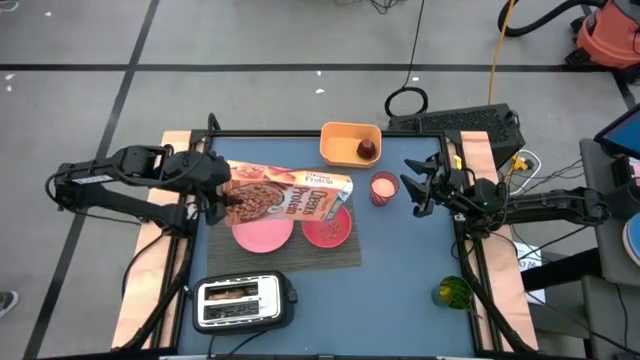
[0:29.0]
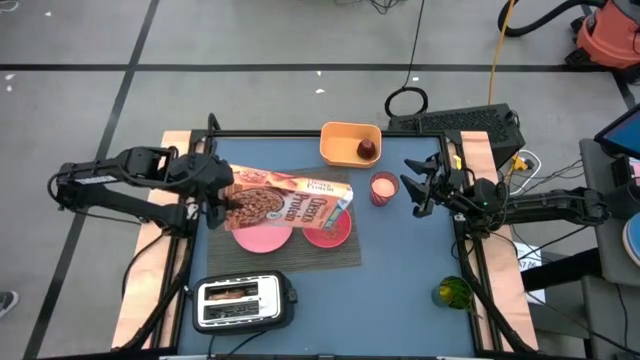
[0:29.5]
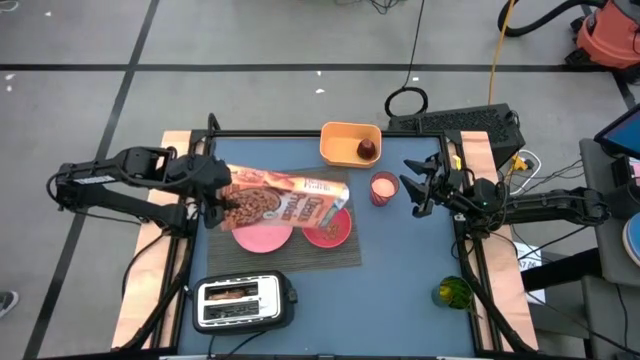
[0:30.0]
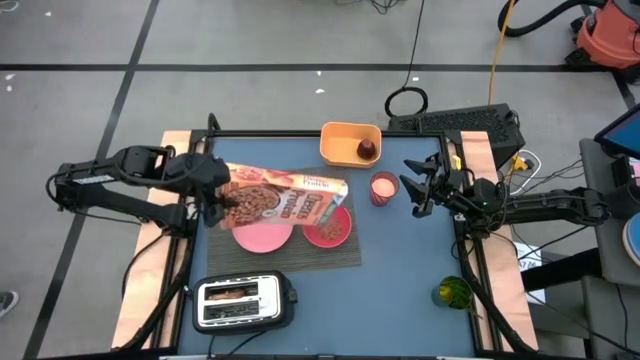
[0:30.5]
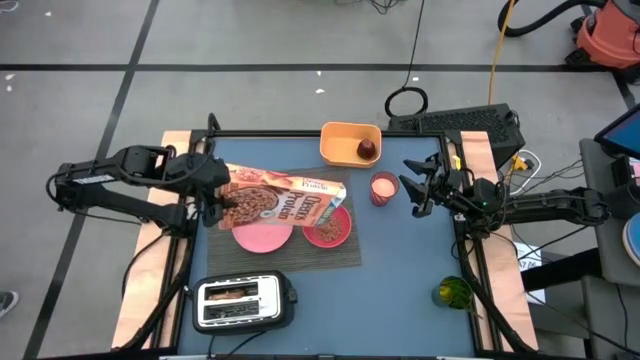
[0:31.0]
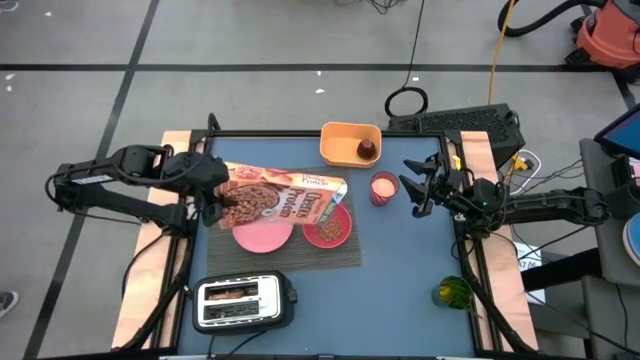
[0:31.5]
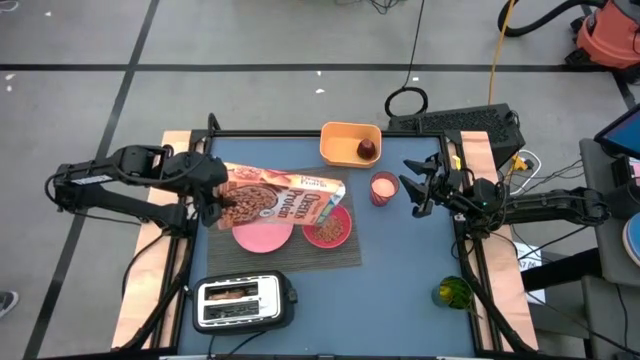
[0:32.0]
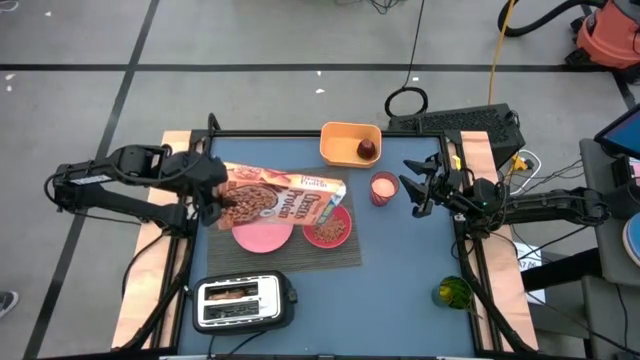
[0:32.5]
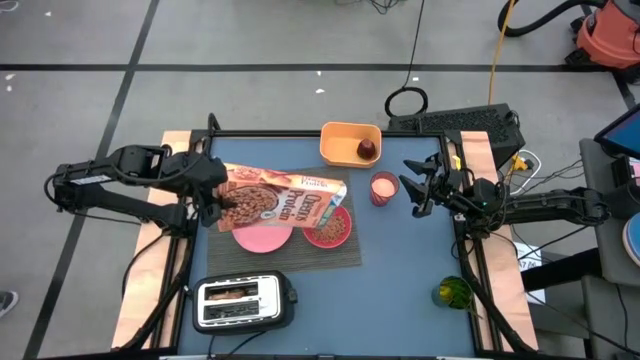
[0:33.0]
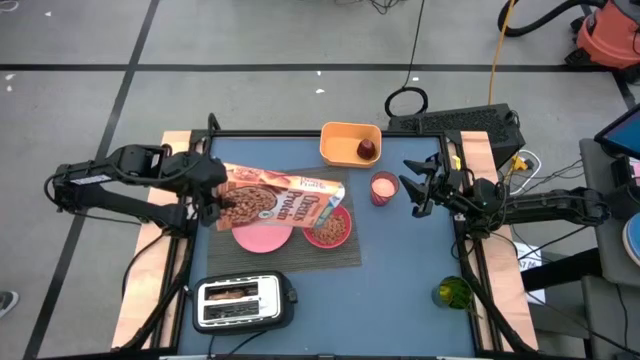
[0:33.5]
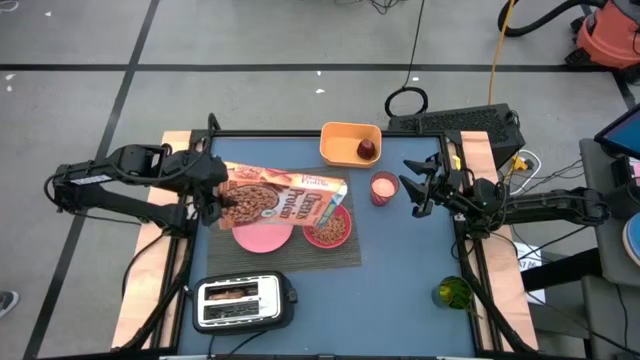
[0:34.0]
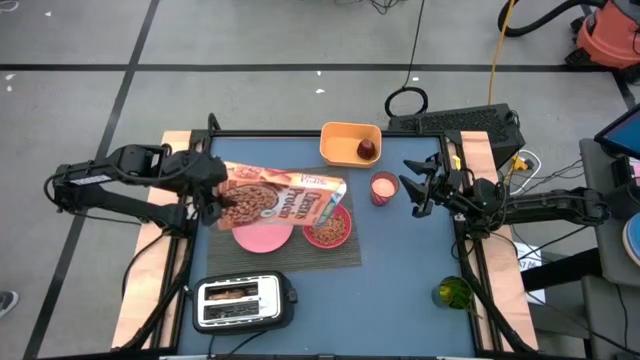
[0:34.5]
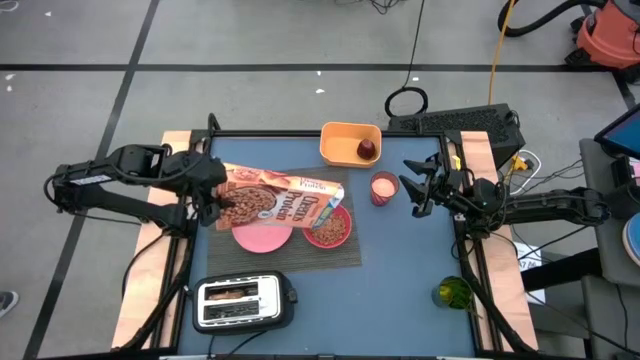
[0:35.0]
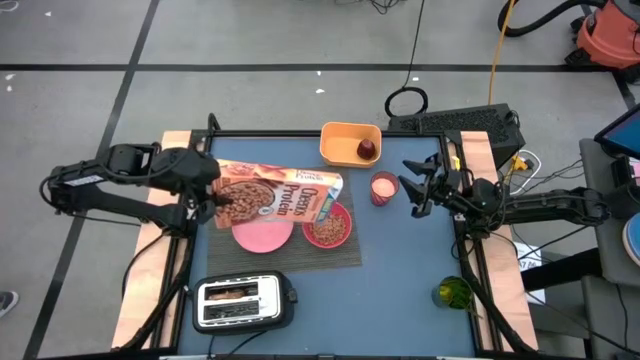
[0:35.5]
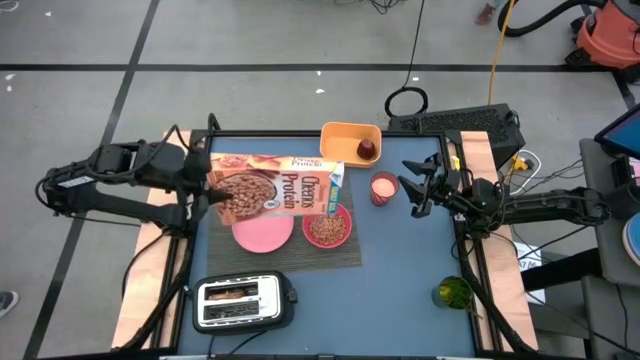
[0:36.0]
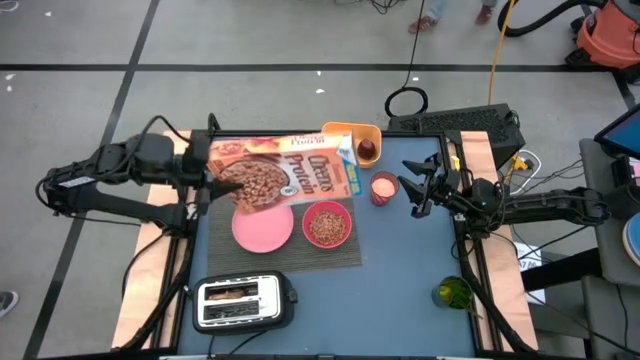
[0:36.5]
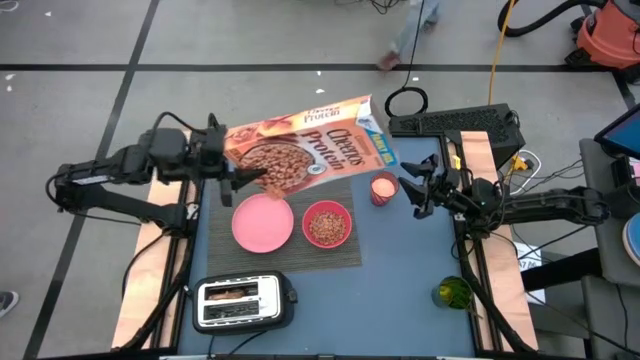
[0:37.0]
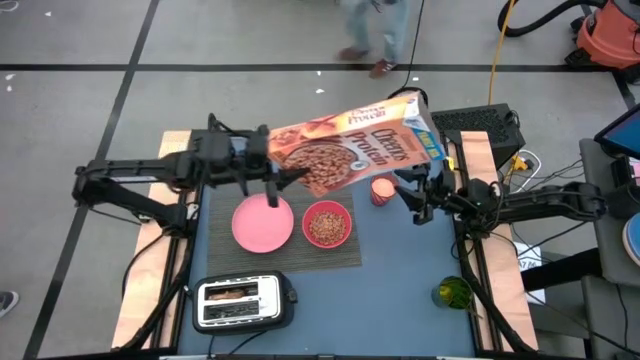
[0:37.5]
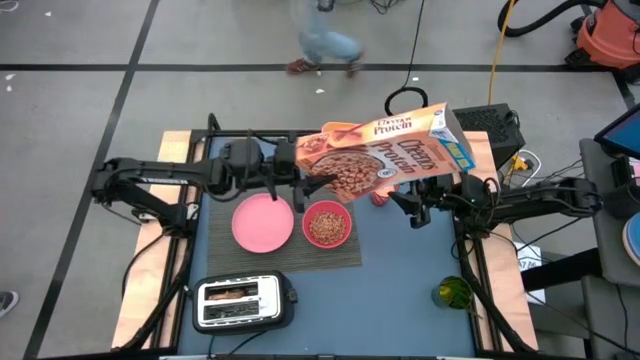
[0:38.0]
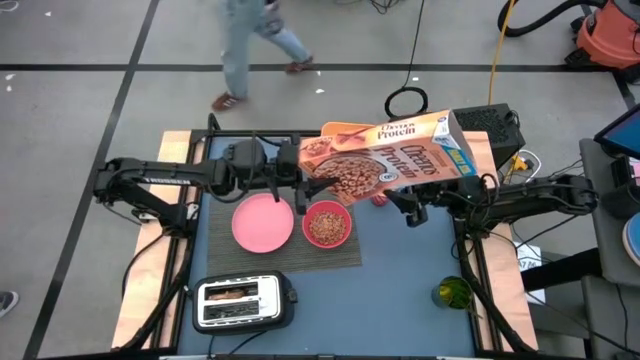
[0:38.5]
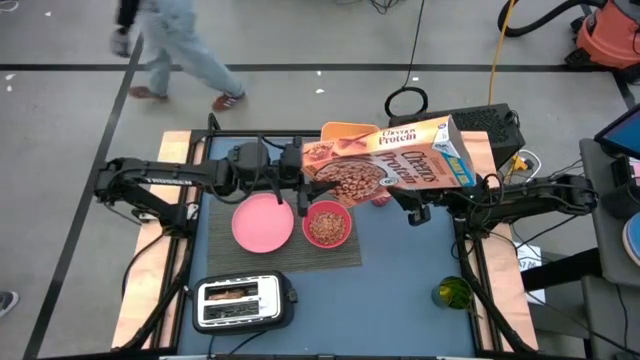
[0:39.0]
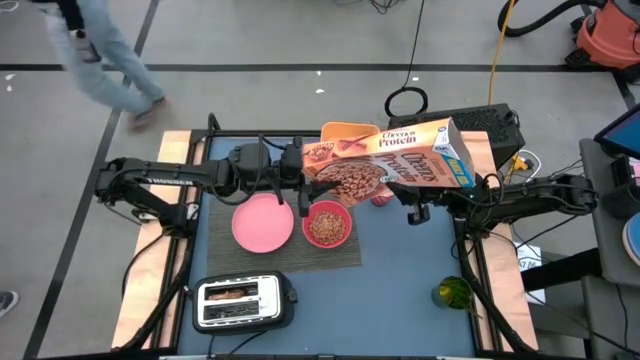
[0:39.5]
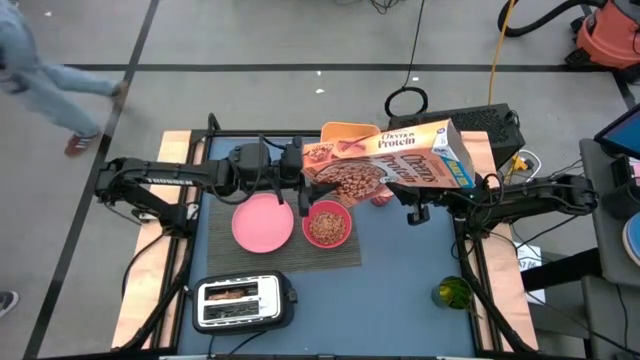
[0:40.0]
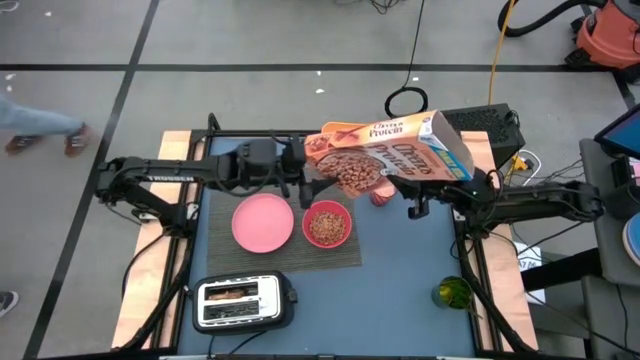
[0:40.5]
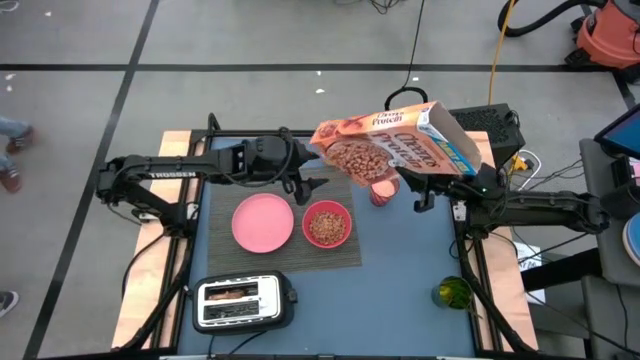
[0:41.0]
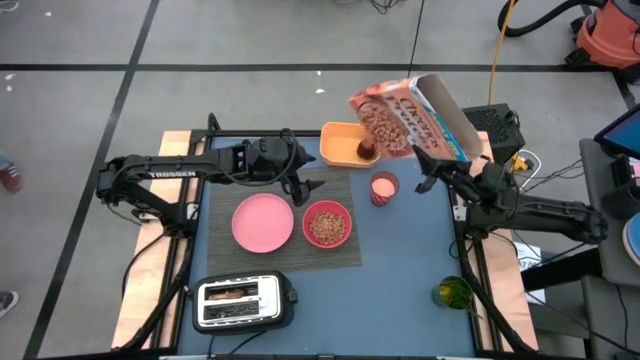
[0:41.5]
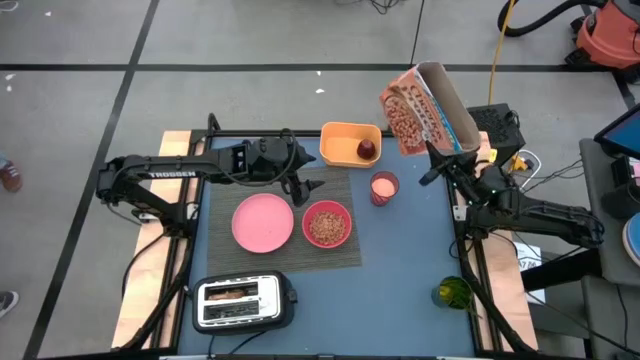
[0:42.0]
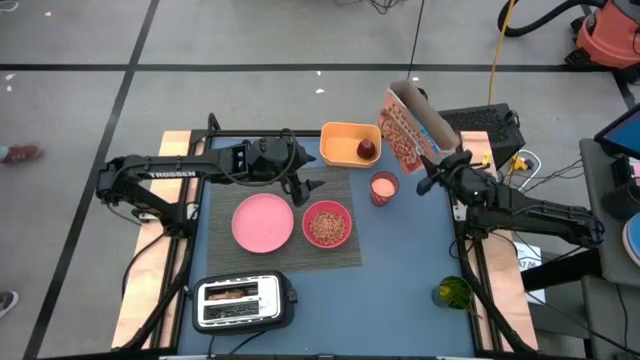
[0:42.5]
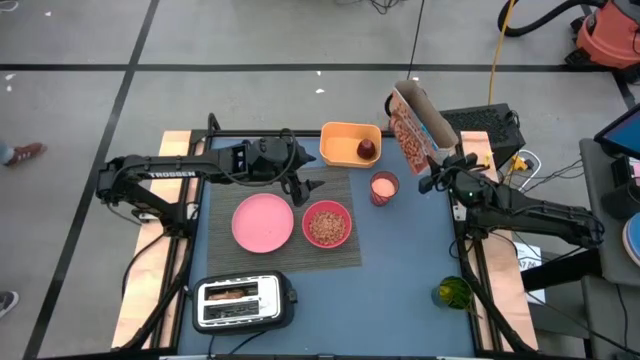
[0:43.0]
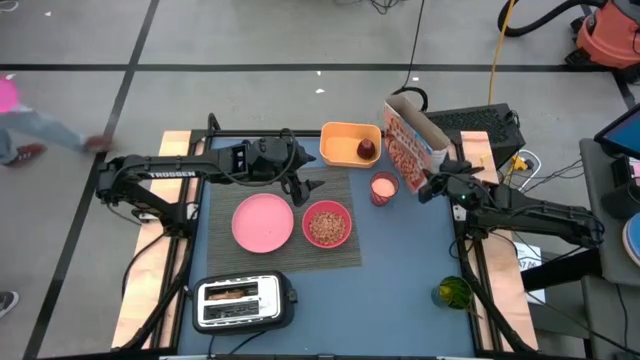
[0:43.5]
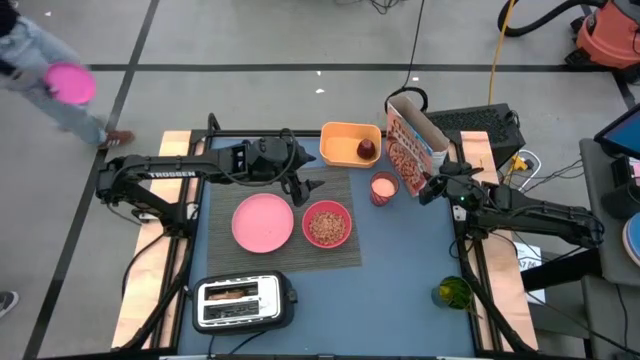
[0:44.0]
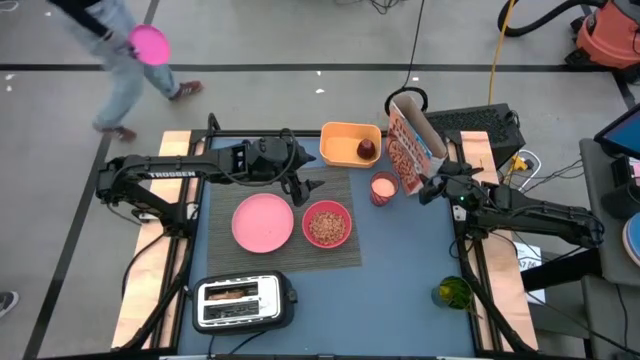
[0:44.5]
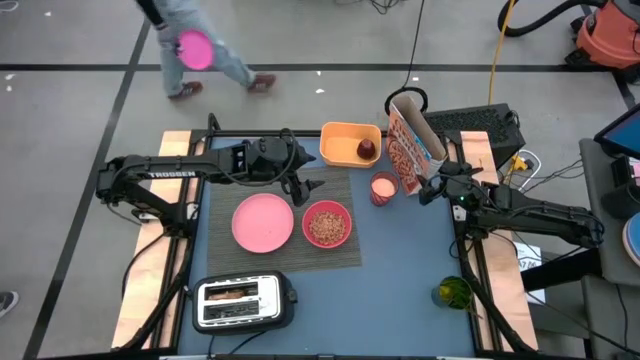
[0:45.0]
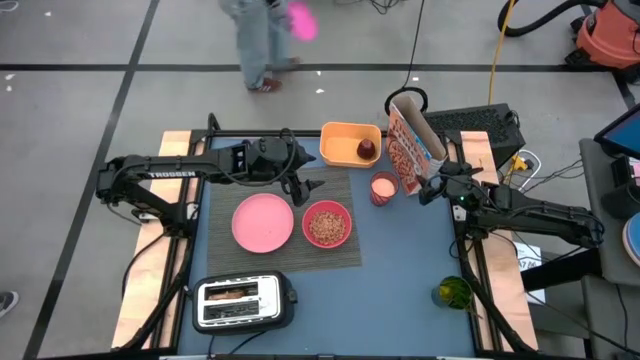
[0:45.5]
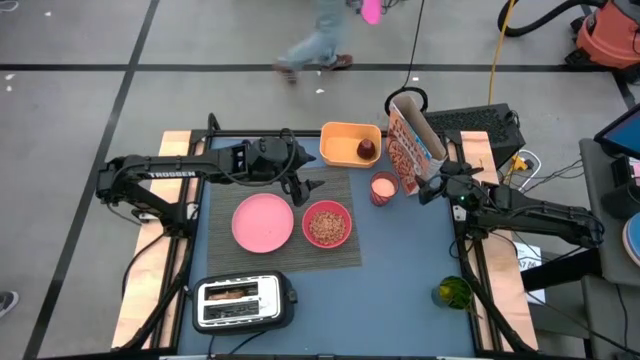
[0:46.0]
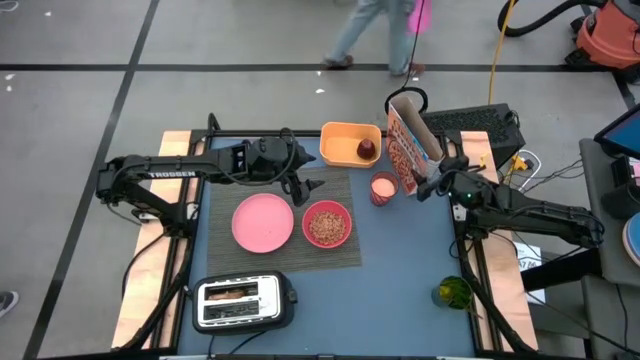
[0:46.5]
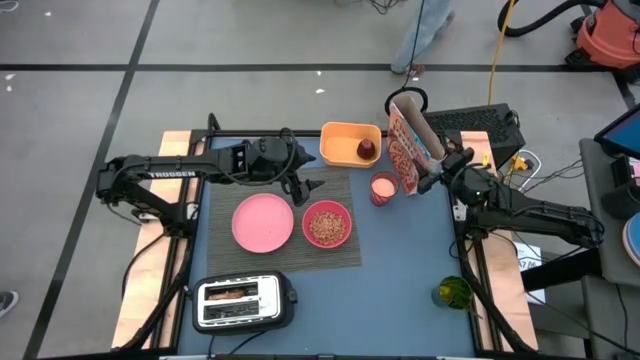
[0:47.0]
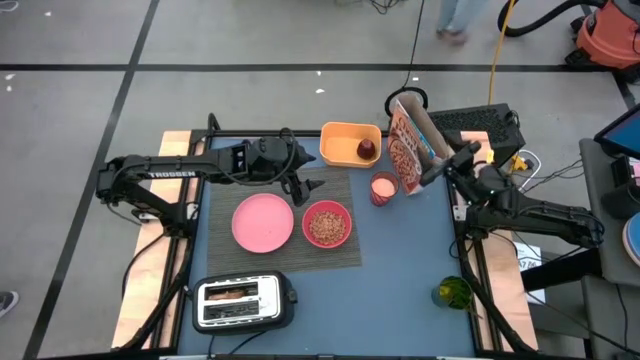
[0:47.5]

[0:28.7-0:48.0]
Task: Arrange a breakfast setting
Pour the cereal into the dark pink bowl

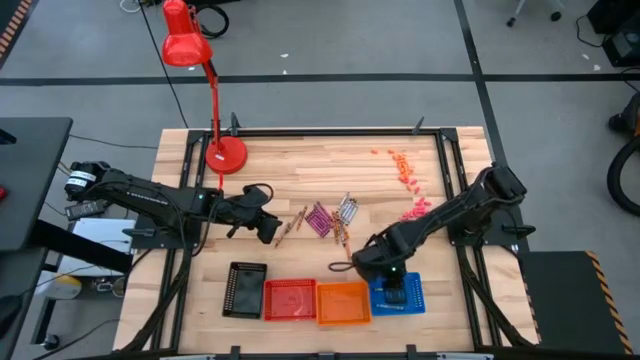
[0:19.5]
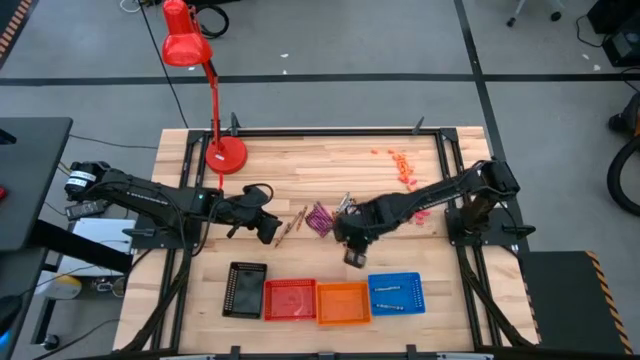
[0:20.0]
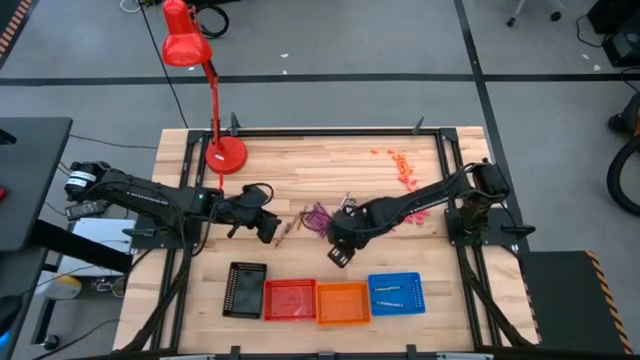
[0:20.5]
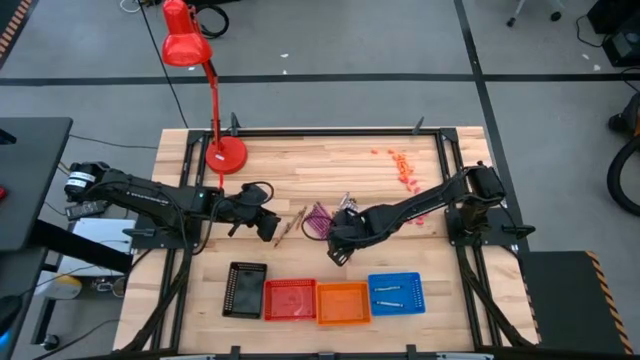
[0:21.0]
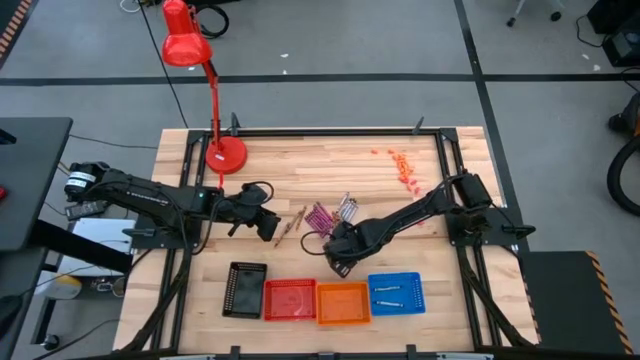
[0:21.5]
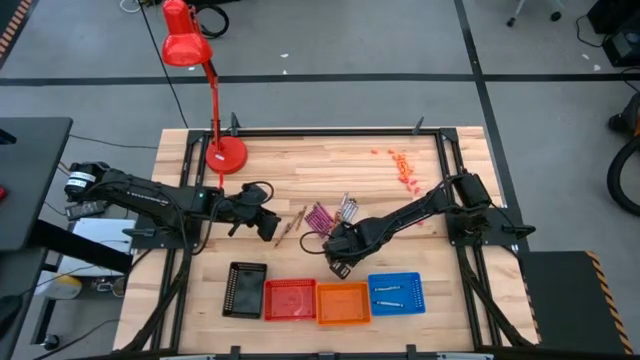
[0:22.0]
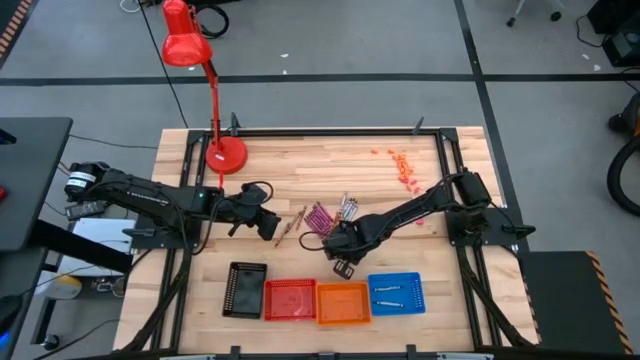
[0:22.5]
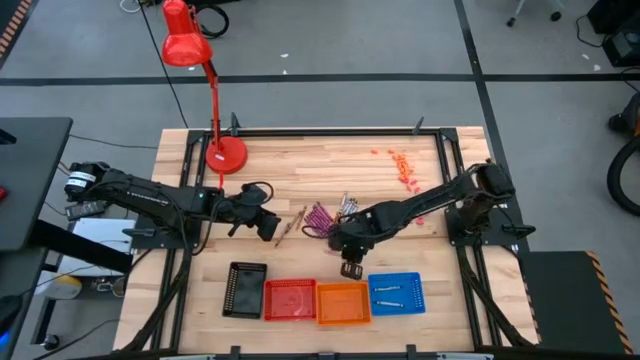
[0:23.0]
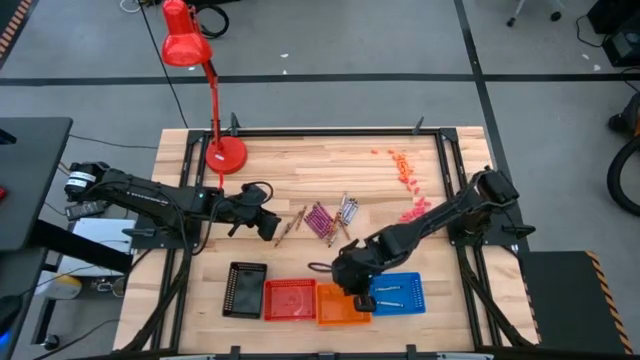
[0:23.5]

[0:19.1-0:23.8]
Task: Sort crayons
Put the orange crayon into the orange bin
